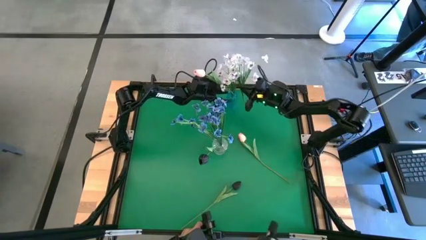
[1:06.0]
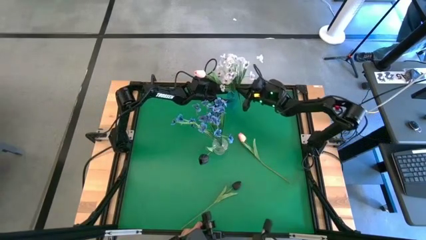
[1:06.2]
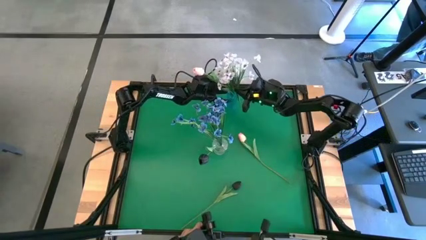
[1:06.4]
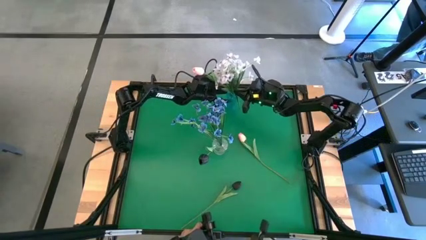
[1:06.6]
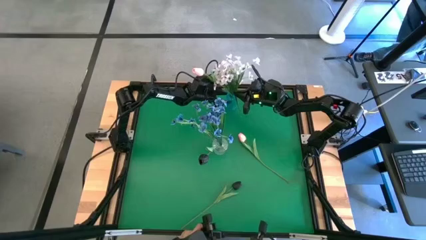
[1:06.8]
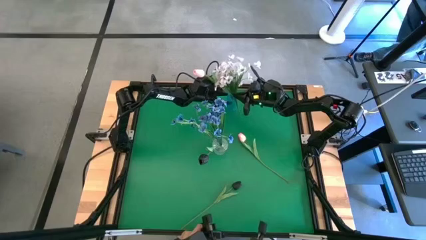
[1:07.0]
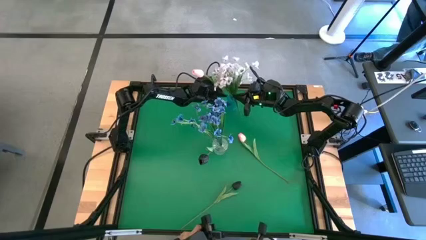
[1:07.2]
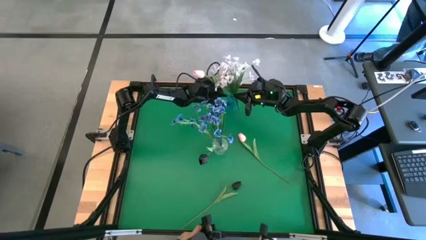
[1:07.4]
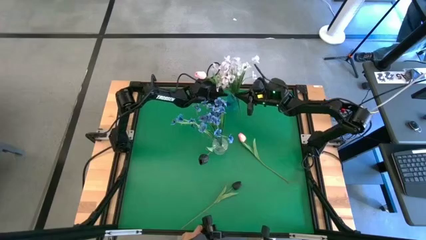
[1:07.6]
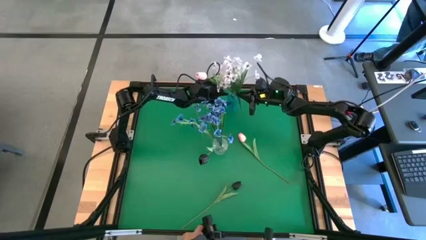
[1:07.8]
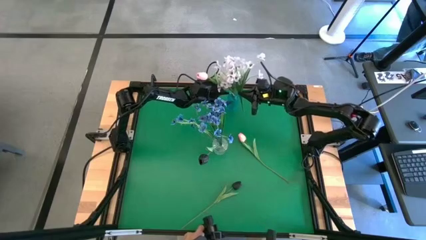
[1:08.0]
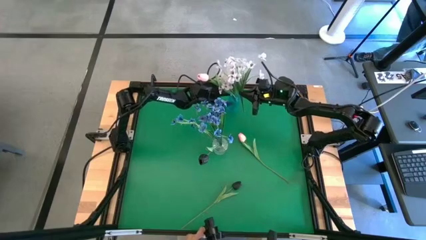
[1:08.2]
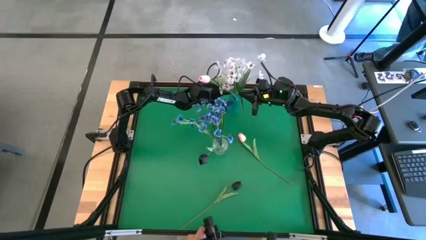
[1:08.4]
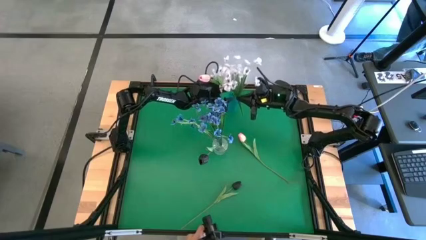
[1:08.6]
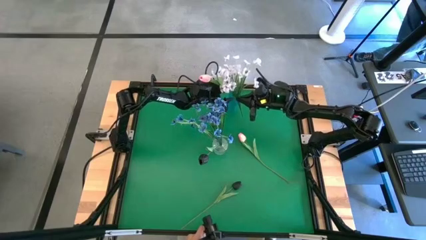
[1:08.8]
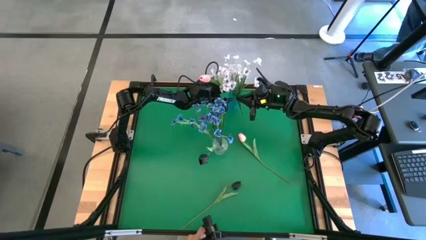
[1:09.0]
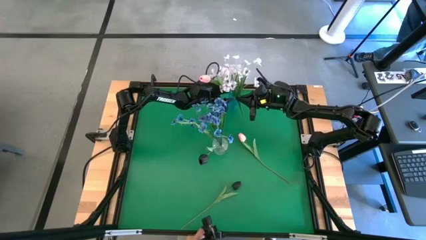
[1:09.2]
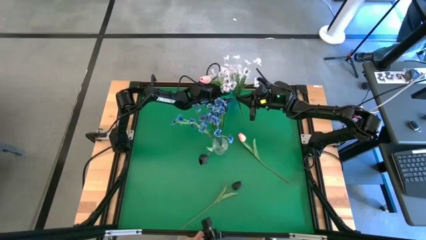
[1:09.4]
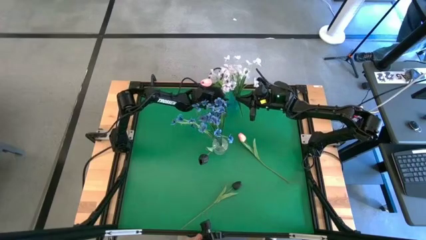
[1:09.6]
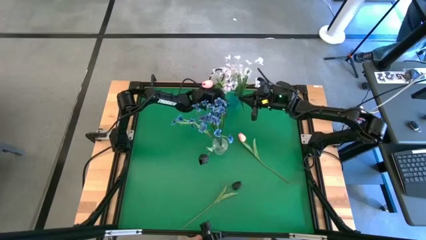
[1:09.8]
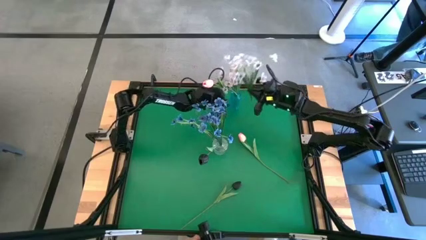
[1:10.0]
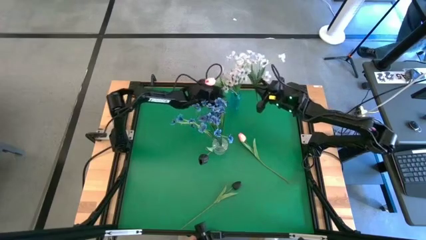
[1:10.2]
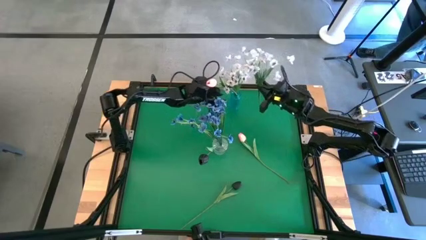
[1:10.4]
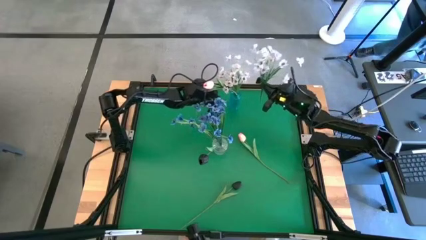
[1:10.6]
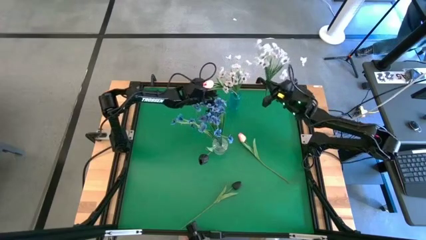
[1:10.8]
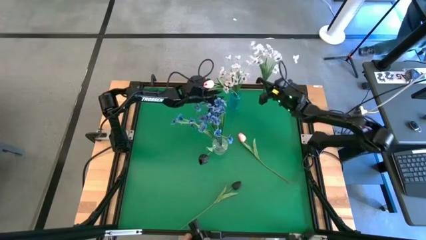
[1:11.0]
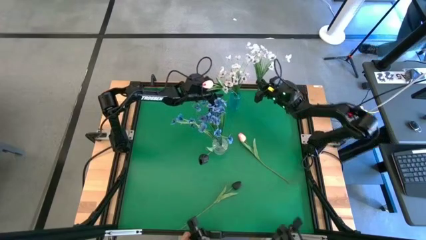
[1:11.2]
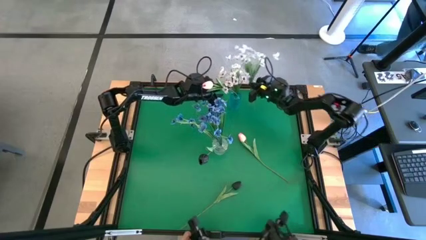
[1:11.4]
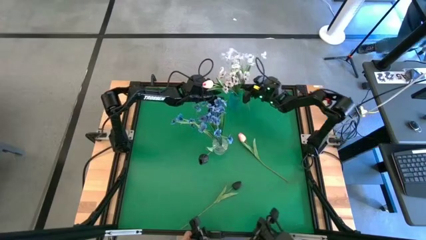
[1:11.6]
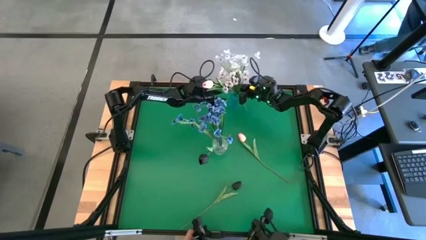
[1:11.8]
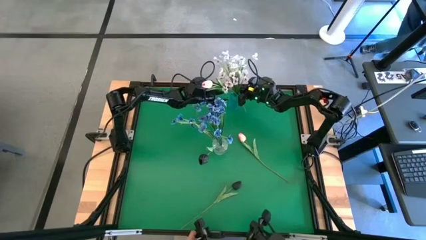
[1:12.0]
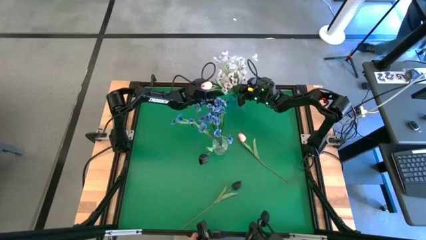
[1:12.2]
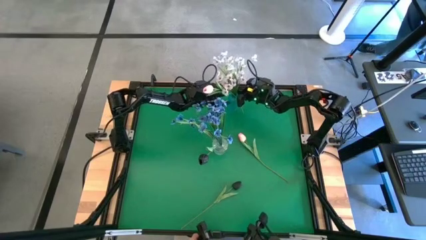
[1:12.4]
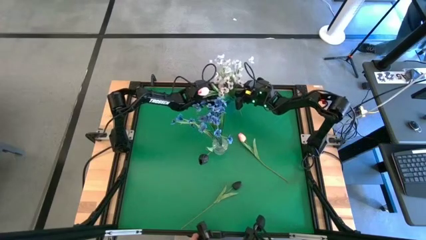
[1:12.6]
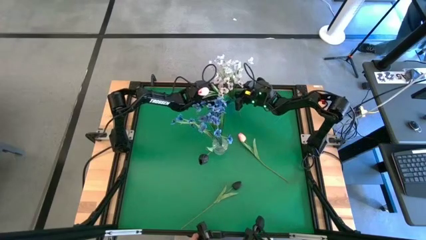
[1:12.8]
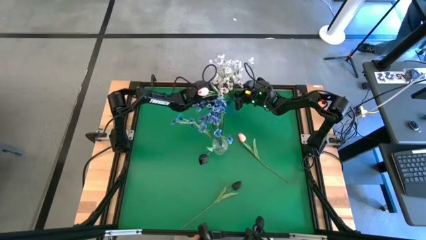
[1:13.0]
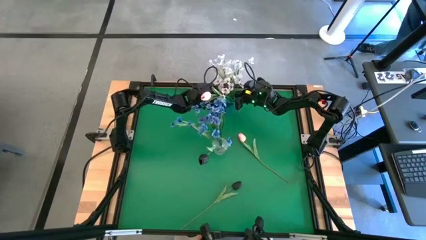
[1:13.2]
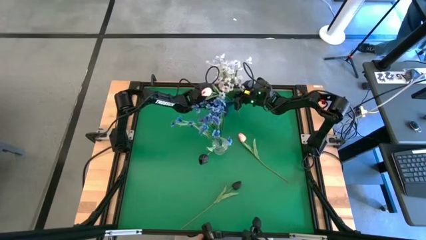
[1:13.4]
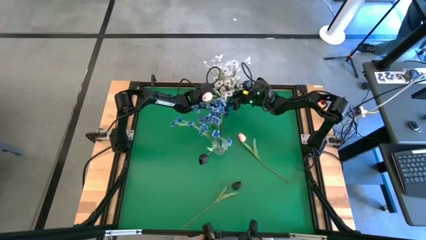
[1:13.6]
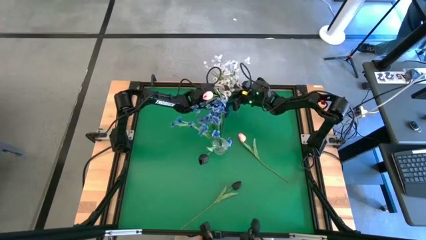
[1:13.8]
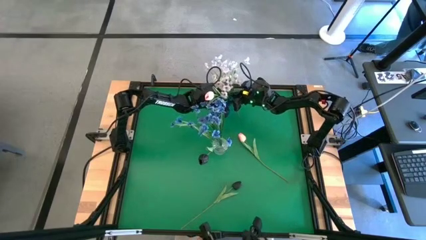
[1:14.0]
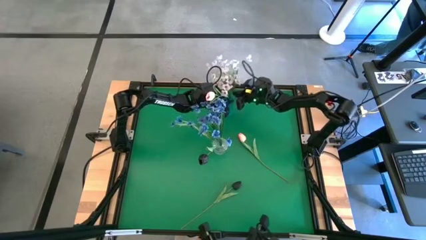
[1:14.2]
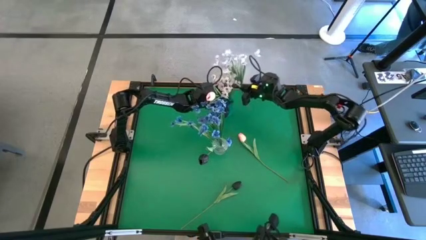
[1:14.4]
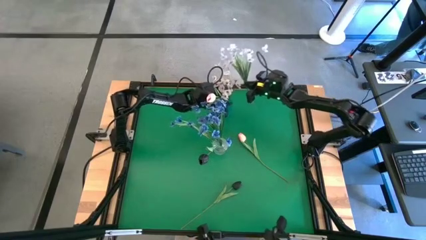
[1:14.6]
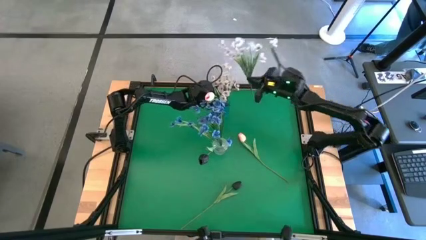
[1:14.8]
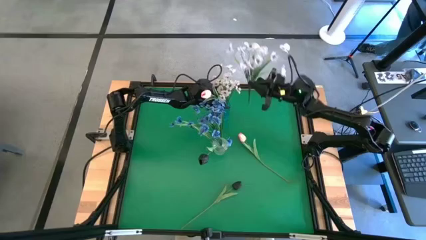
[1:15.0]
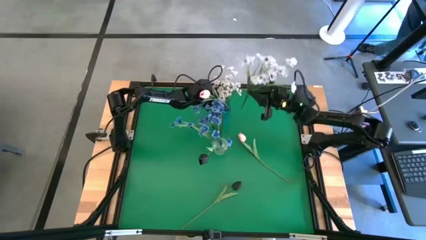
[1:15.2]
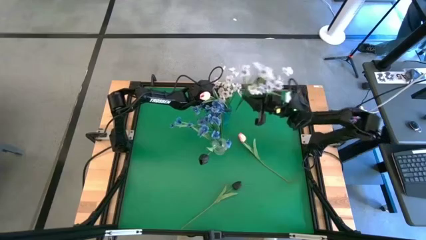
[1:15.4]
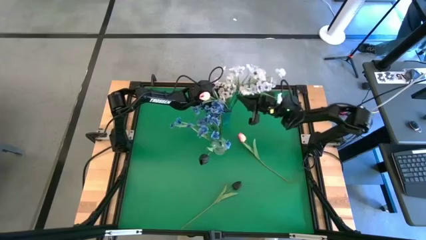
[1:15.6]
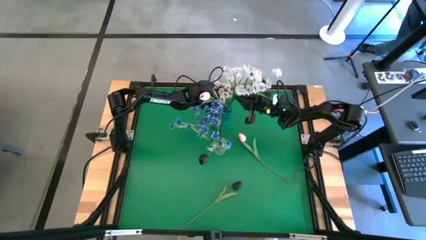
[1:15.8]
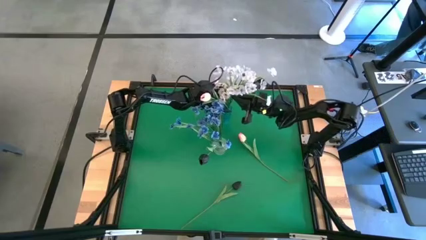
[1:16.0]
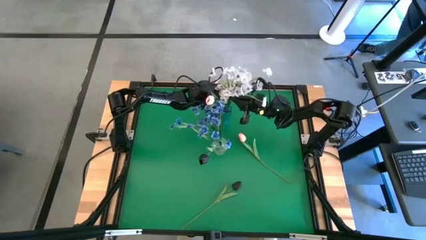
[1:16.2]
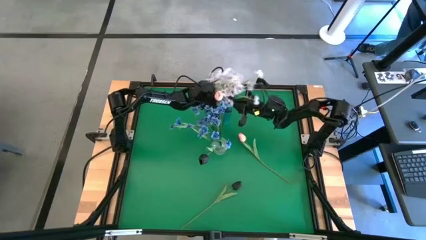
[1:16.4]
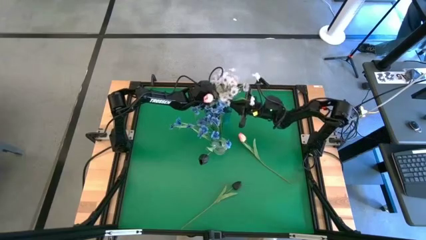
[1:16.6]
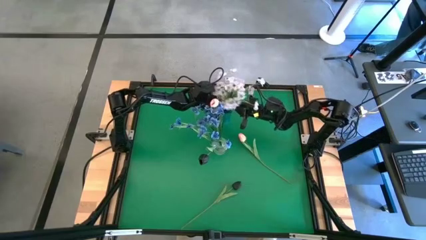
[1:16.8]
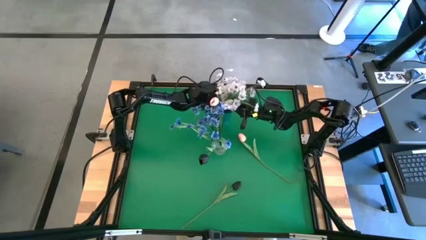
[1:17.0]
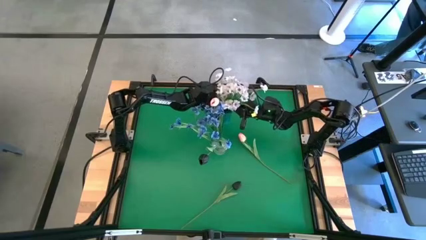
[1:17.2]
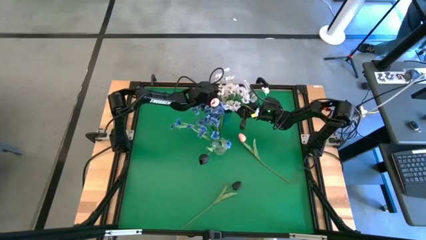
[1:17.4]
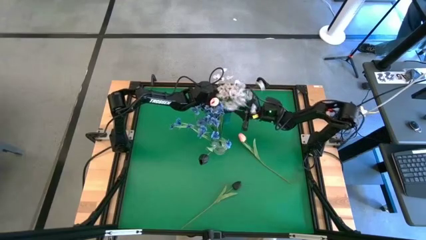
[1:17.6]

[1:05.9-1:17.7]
Task: Sort flowers into vase by color
Put the white flowers into the blue transparent vase
